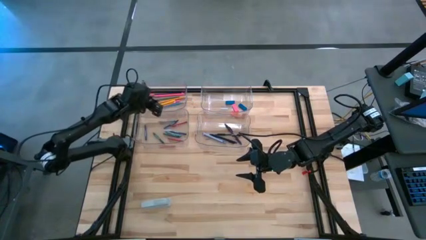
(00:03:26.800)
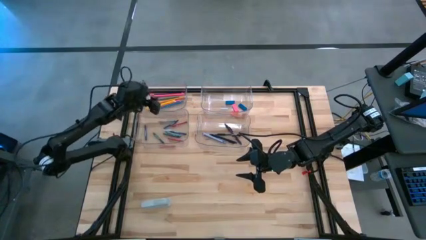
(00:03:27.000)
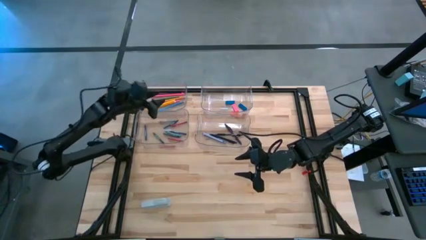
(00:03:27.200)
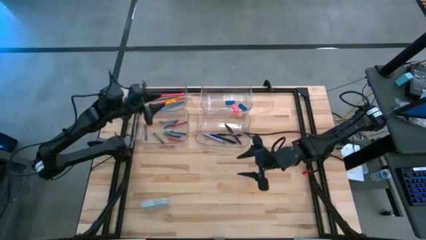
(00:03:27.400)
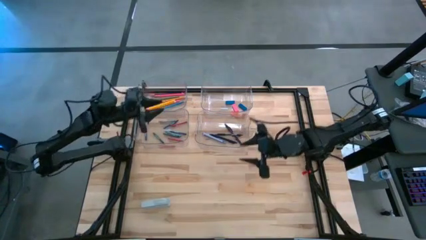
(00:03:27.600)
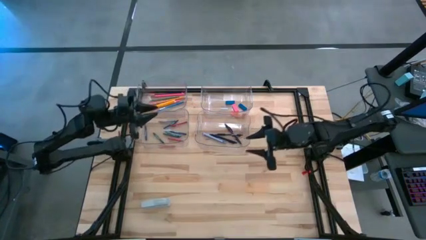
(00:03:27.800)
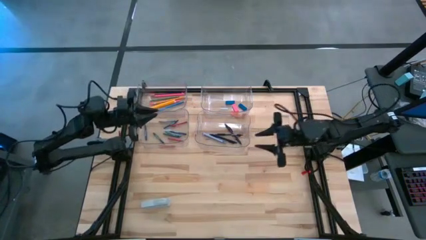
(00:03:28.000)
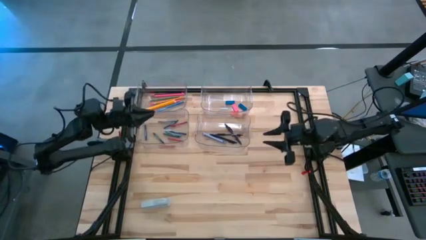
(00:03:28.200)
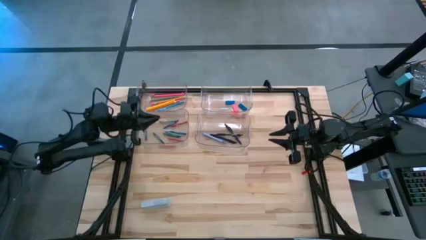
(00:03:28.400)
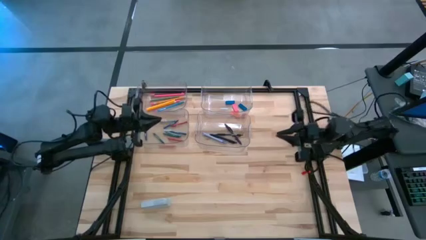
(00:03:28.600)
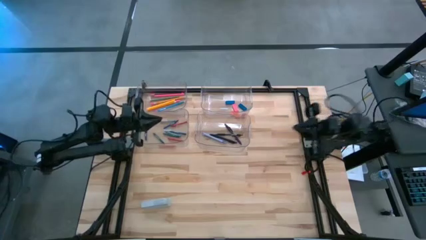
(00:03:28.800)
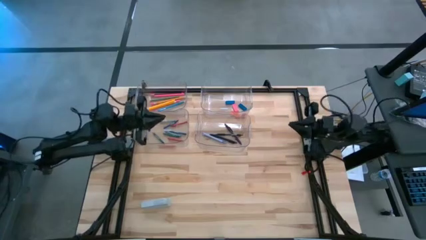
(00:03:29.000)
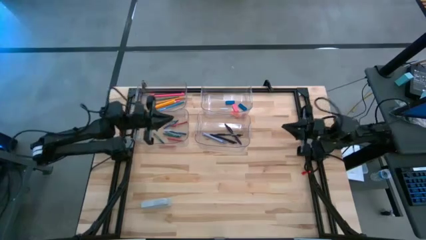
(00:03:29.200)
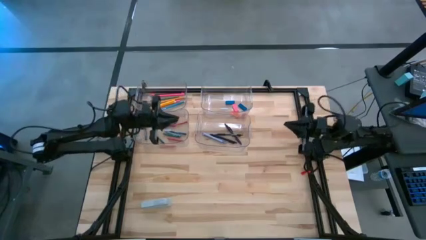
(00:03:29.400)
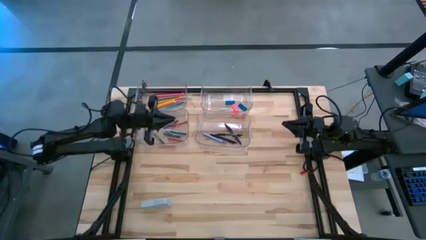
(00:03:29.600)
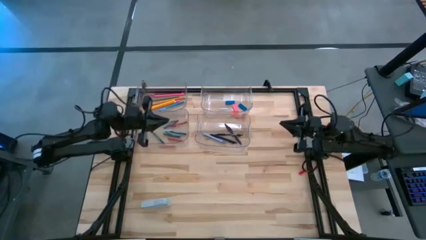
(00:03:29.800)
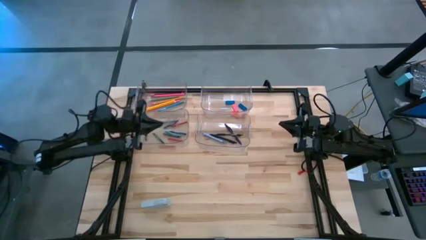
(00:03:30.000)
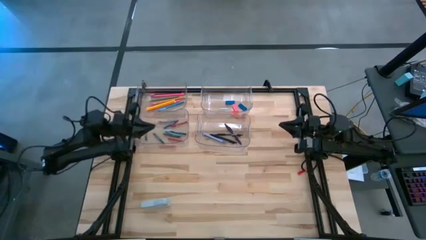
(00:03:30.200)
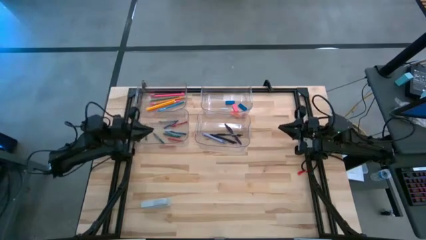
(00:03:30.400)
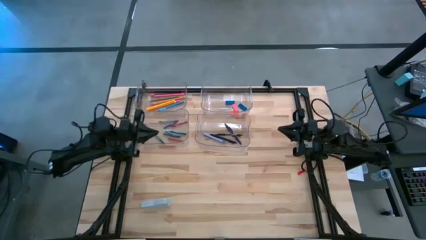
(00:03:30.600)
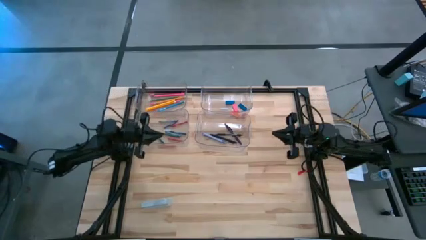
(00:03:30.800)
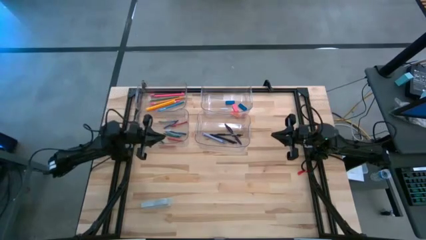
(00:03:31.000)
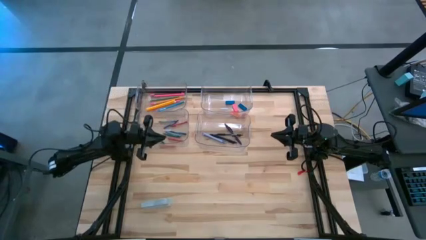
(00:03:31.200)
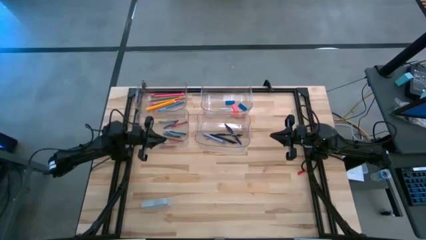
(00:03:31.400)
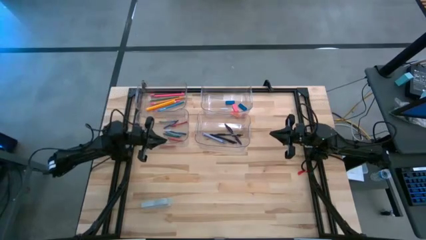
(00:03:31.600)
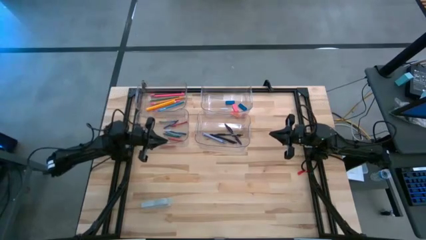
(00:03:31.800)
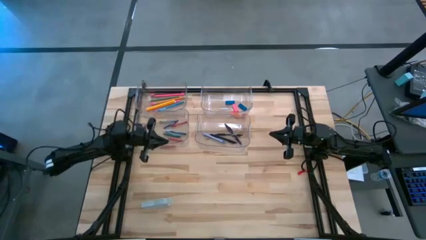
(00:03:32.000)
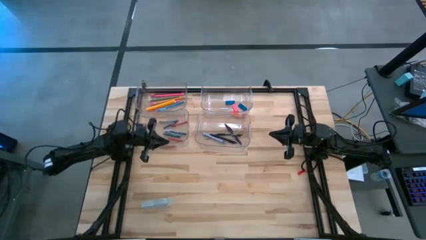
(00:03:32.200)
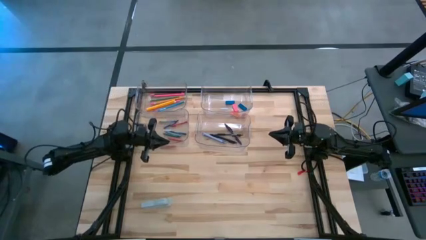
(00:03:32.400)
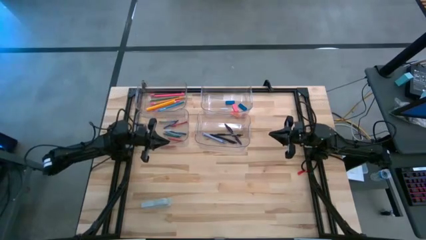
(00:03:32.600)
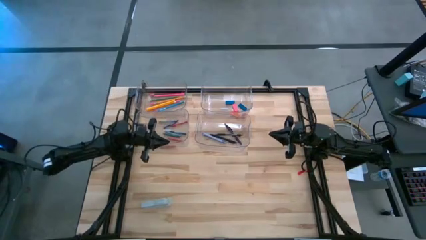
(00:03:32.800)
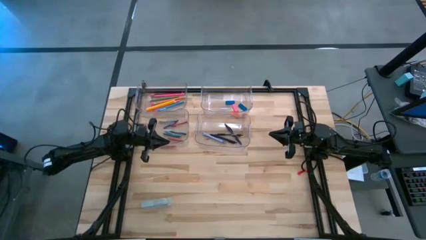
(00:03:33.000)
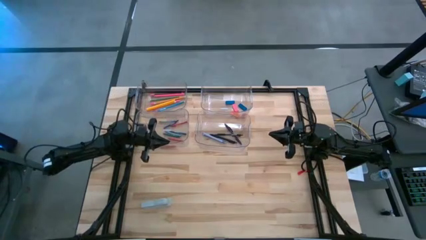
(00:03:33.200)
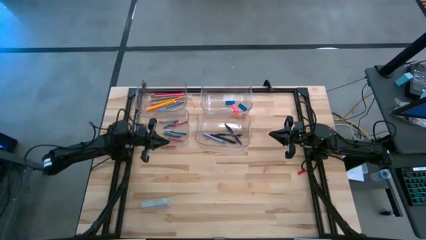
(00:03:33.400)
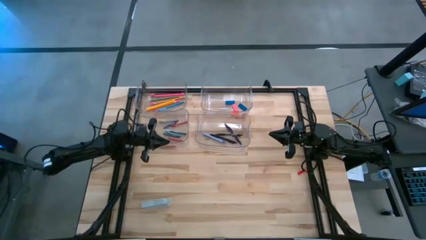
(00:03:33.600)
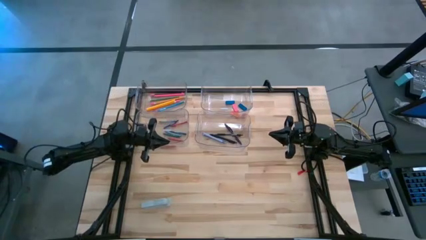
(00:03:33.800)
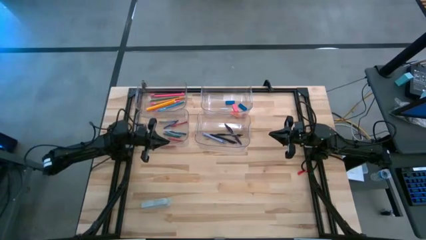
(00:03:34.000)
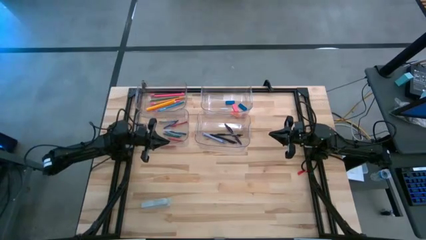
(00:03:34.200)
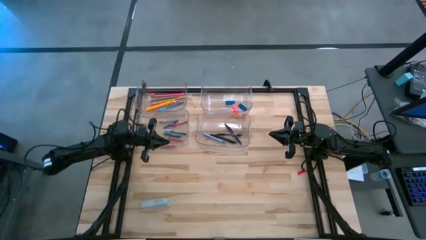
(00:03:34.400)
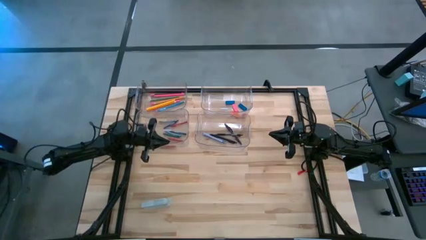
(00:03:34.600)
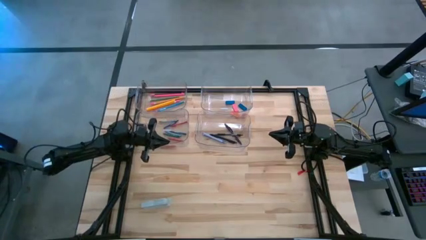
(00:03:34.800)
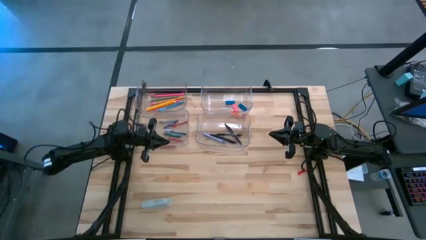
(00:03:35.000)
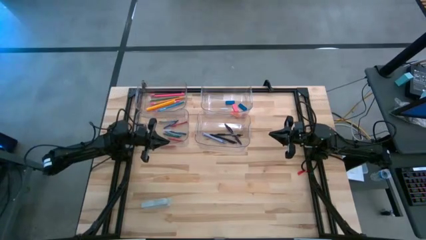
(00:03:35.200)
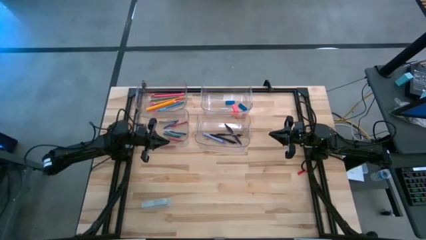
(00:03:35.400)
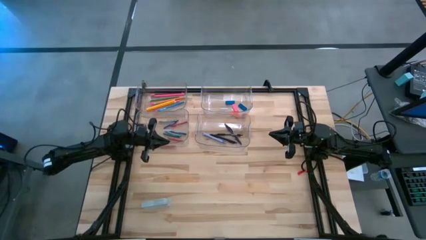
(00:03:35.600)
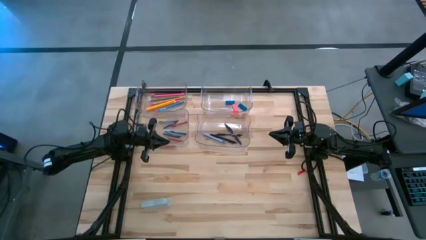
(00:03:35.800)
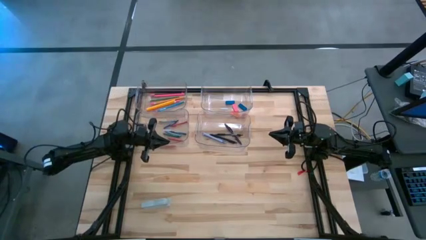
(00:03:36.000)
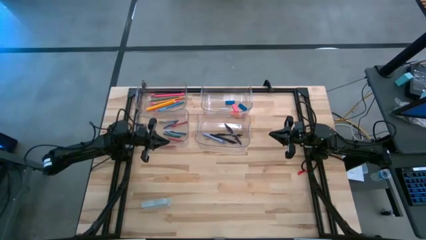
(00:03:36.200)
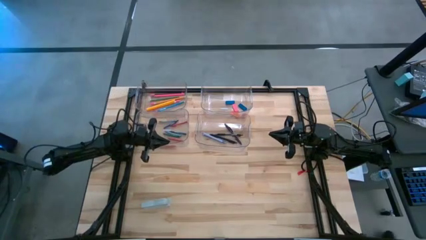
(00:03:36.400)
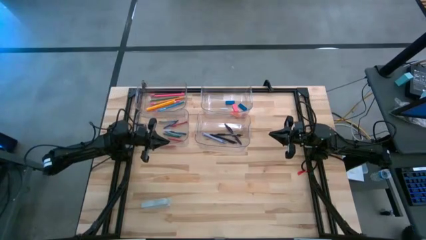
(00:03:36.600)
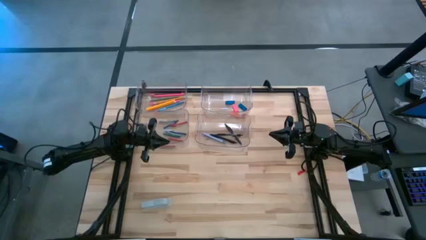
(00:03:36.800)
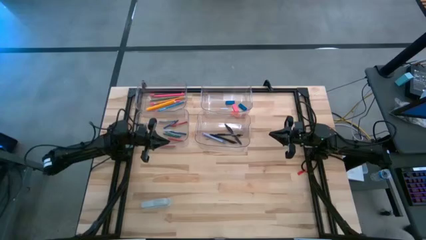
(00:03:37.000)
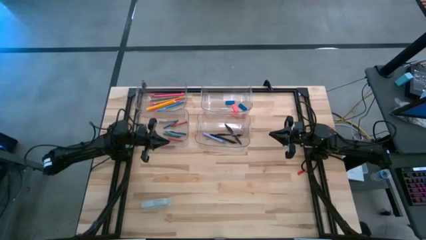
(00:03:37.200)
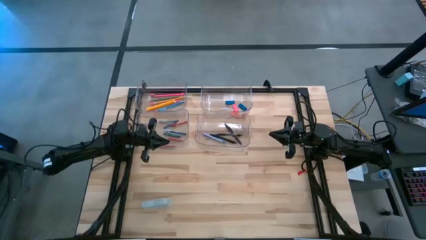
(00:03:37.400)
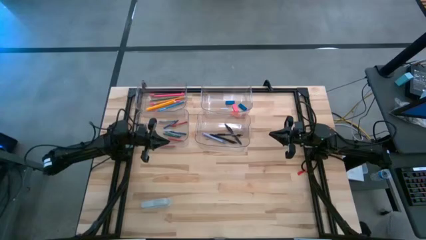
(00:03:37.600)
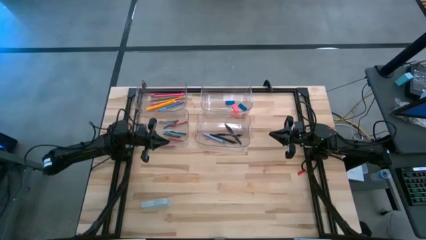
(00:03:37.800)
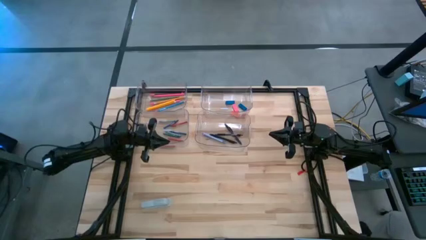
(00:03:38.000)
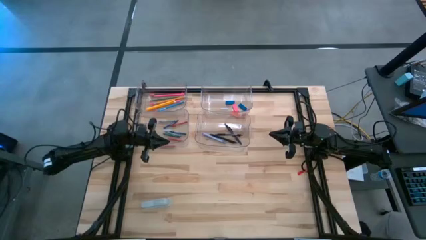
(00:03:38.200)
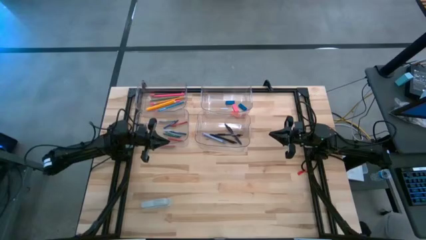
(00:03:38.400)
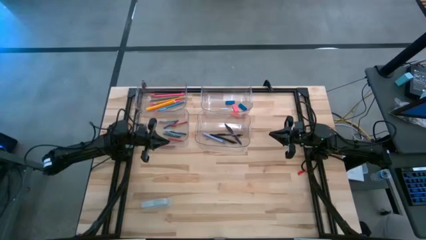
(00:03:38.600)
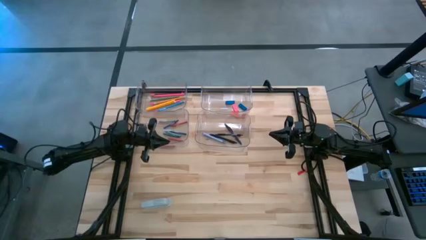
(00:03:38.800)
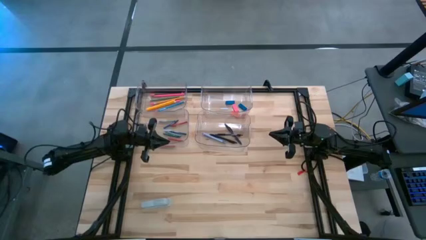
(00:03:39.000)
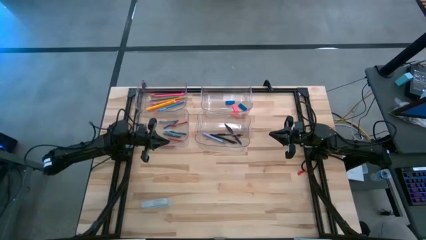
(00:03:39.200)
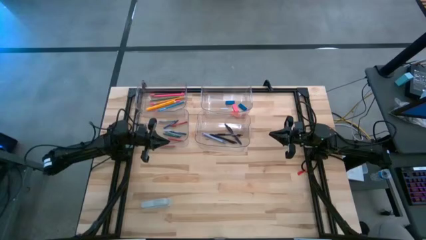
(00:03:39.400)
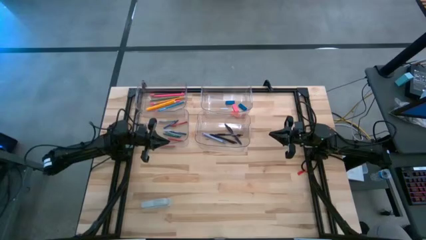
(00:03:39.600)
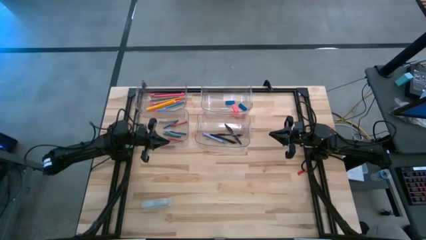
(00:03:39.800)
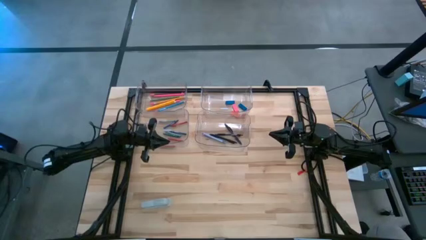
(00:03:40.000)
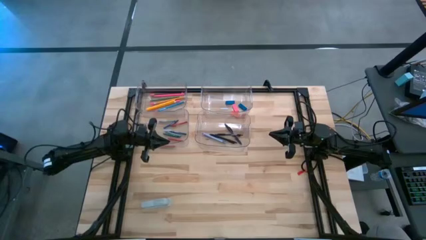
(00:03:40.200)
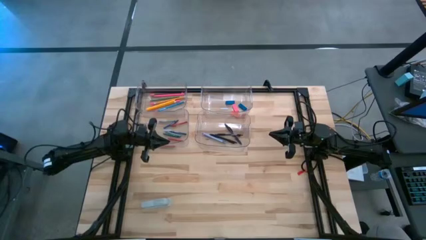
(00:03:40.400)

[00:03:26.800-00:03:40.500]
Task: Sort crayons/erasers/pens/pencils in bins
Return to Home Position
